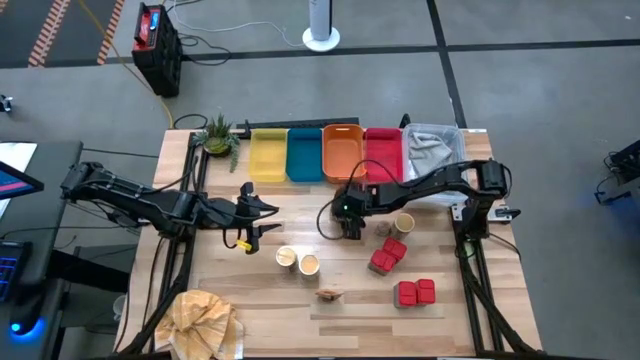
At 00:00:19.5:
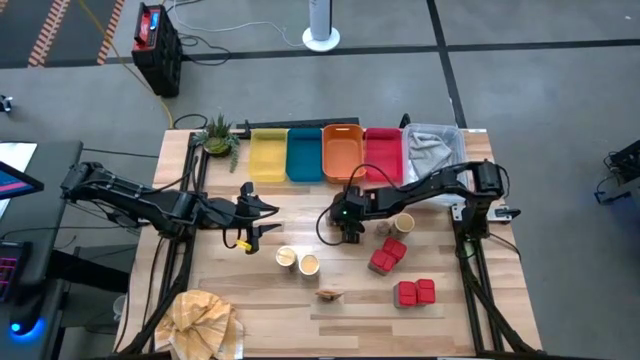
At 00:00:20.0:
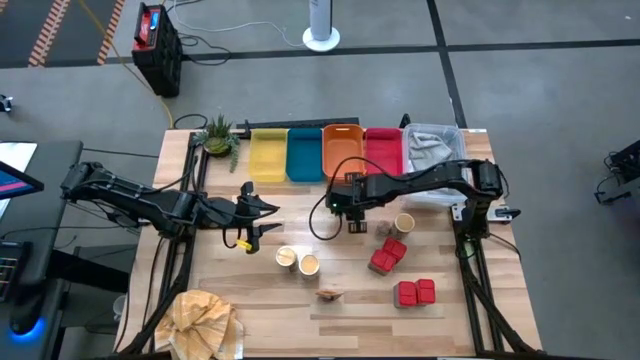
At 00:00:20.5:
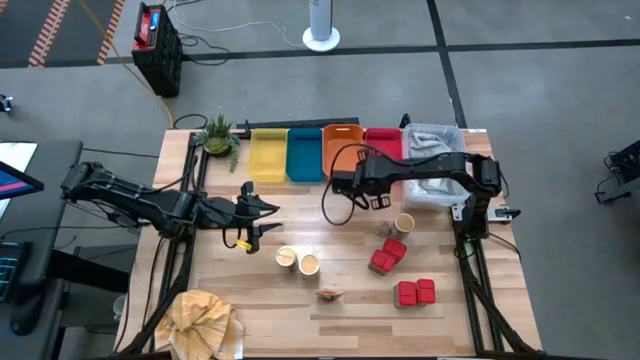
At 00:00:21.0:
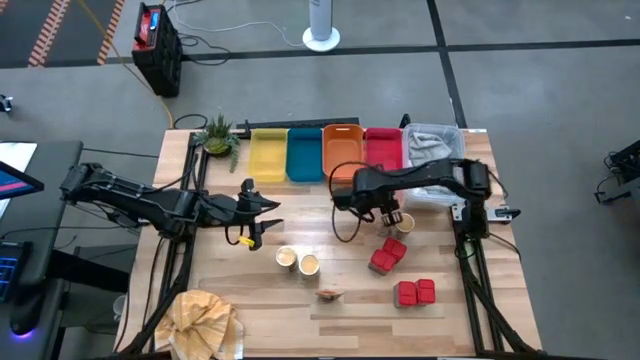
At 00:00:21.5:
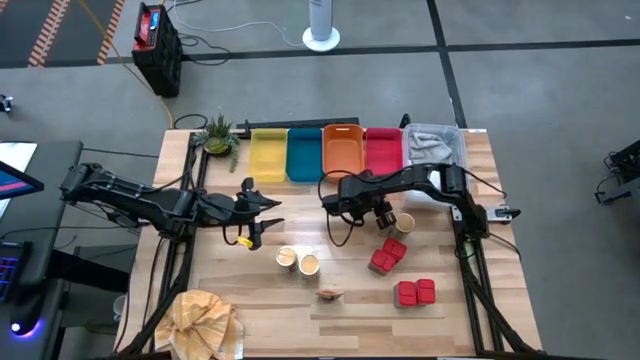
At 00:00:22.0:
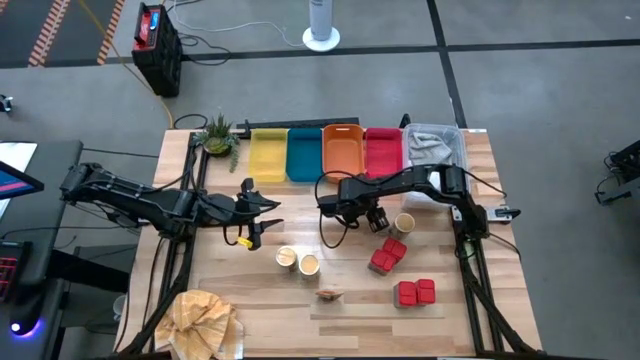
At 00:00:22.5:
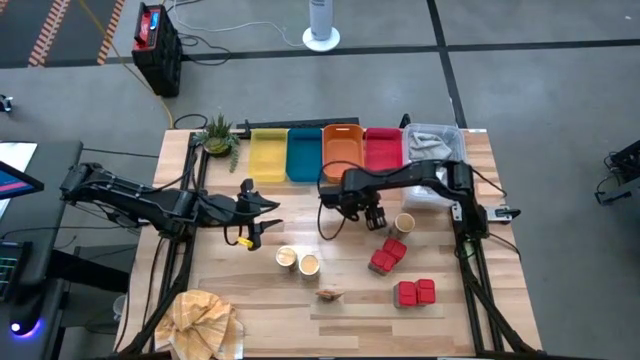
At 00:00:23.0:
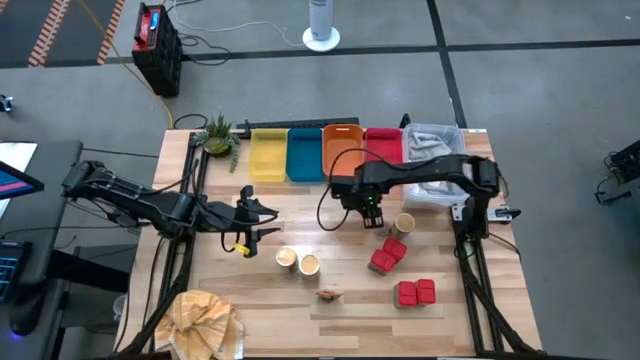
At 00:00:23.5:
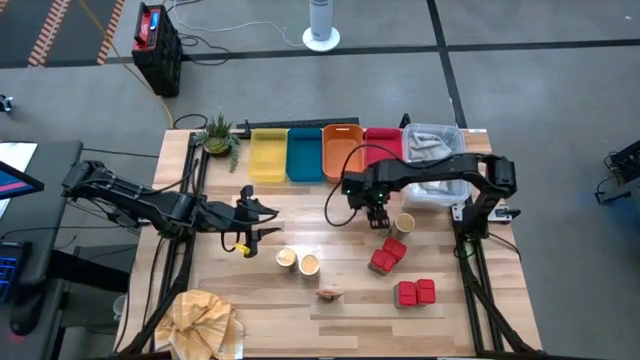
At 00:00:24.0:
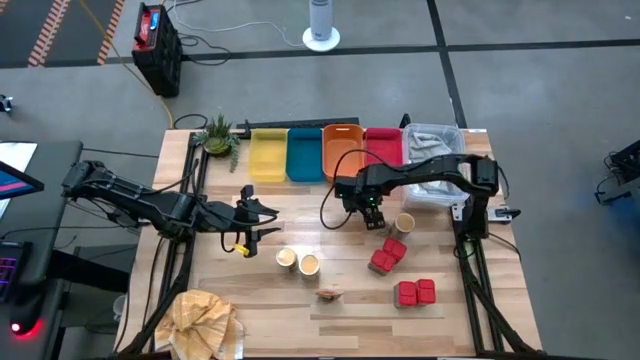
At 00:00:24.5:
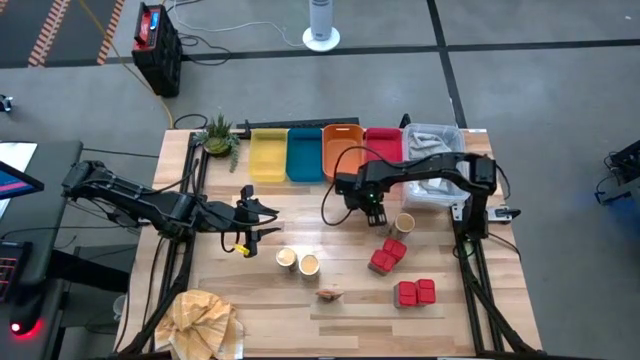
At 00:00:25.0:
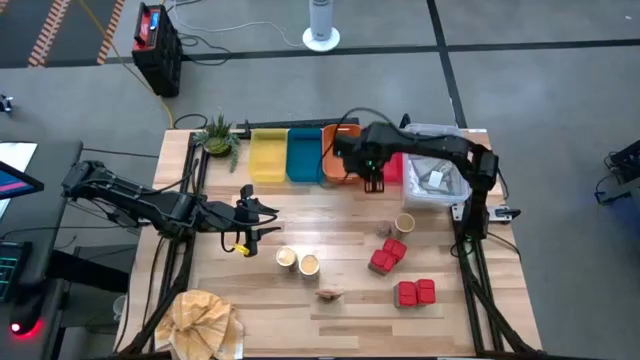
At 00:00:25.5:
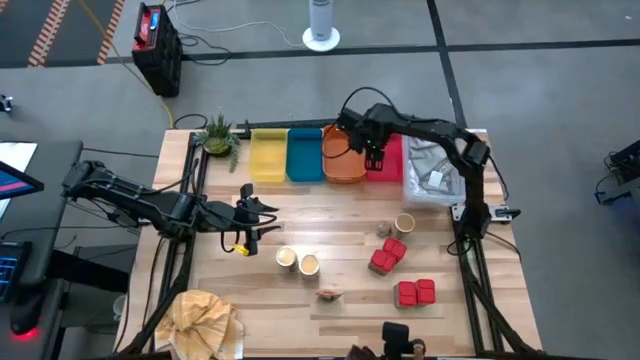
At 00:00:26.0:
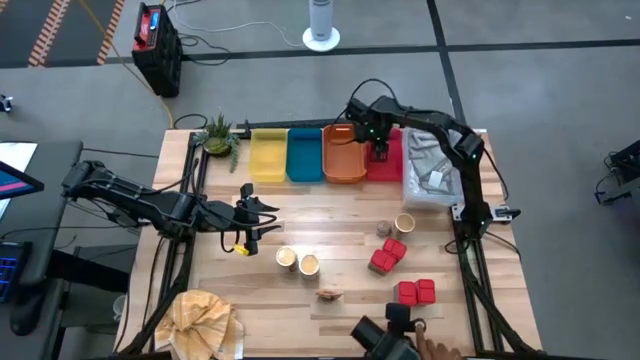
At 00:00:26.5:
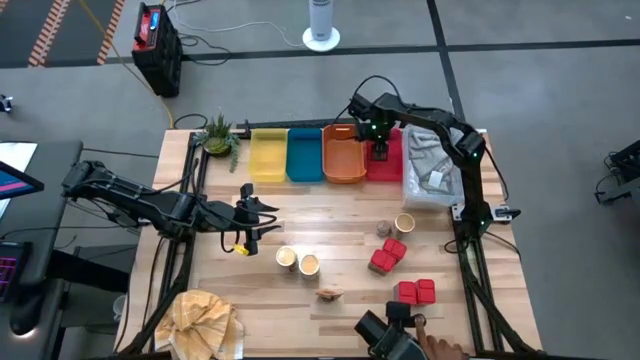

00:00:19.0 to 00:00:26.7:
Task: Sort spices by type
Put the top brown spice bottle into the red bin

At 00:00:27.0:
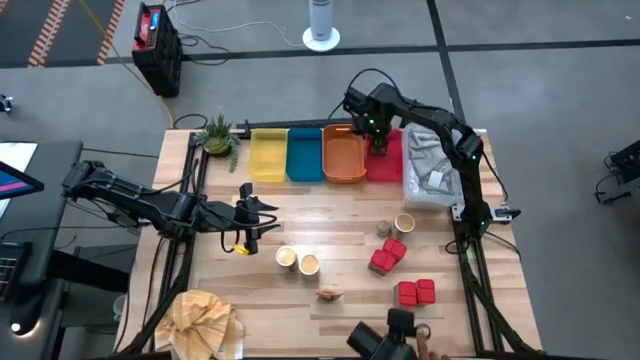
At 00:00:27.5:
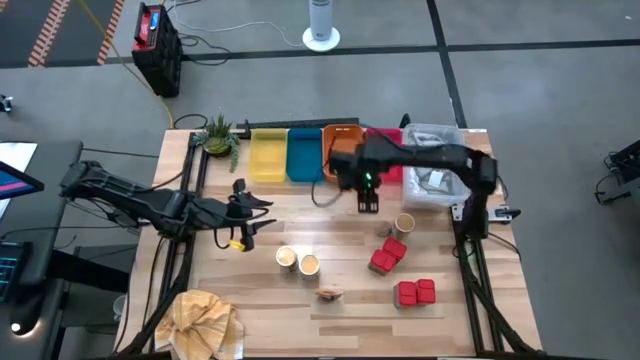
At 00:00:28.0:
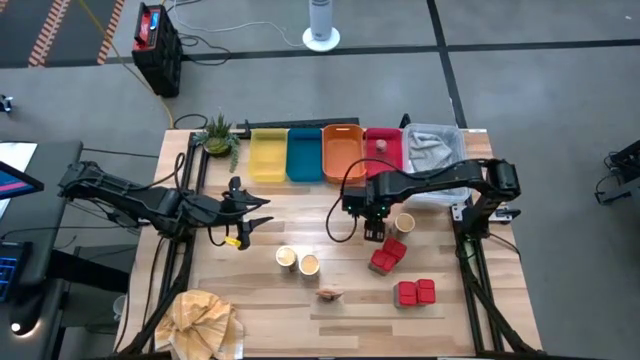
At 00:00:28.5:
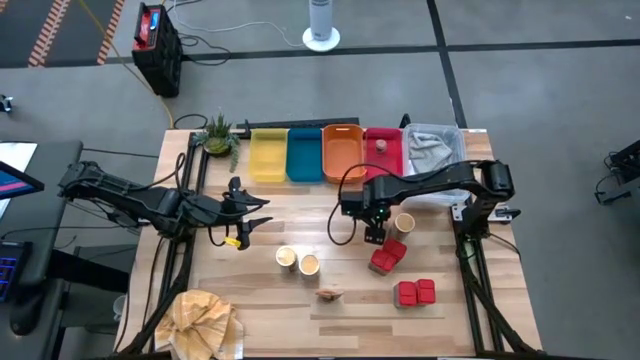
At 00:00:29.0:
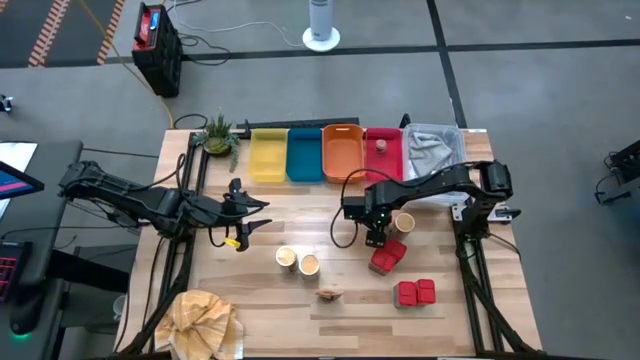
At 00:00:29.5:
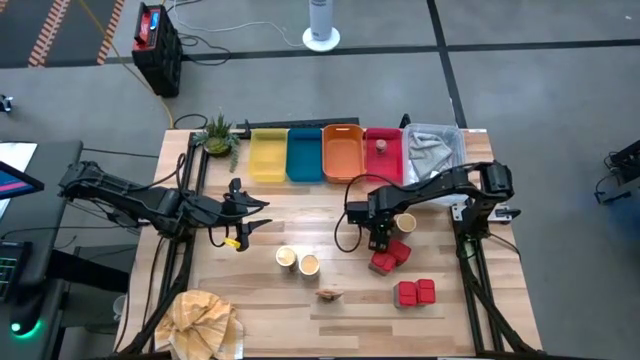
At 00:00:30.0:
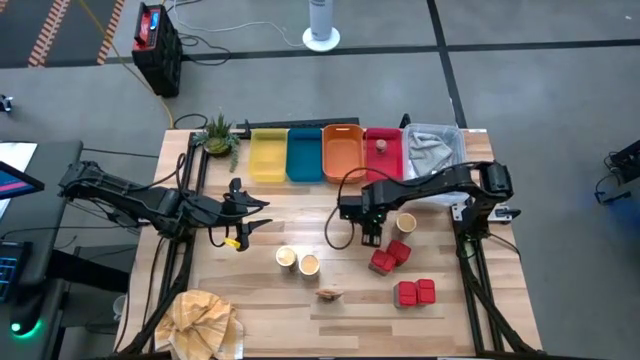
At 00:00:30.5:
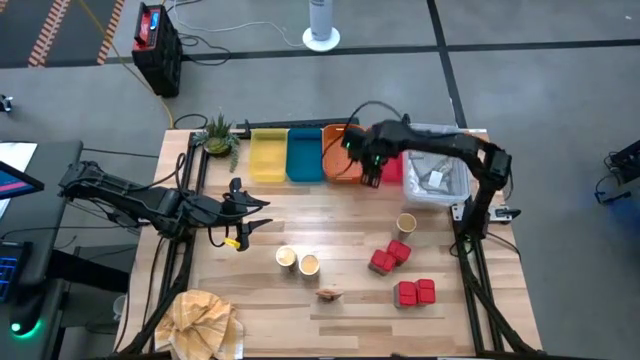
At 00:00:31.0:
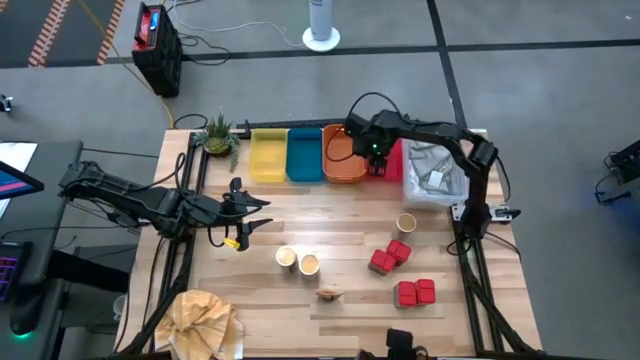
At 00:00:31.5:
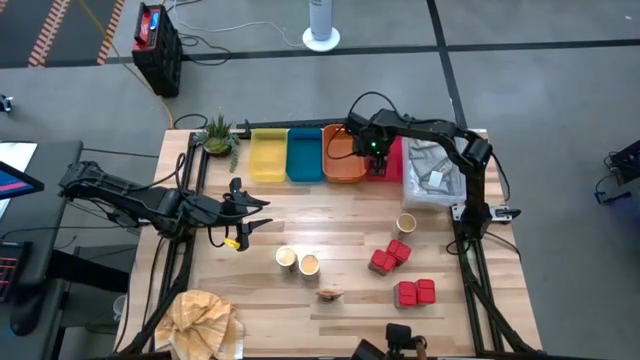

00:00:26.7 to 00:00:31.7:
Put the brown spice bottle into the red bin

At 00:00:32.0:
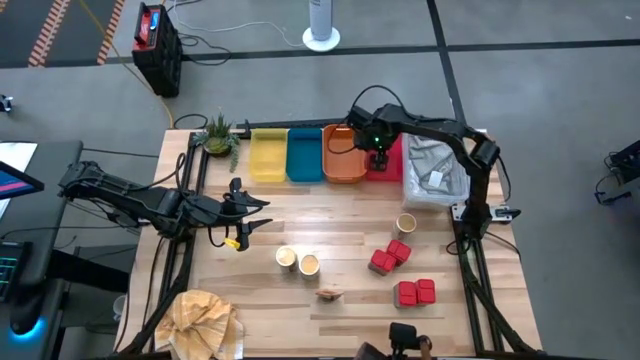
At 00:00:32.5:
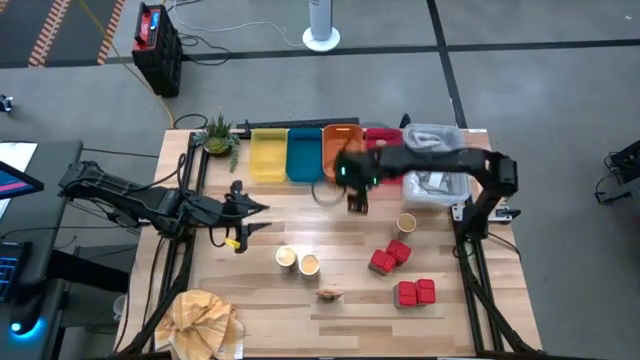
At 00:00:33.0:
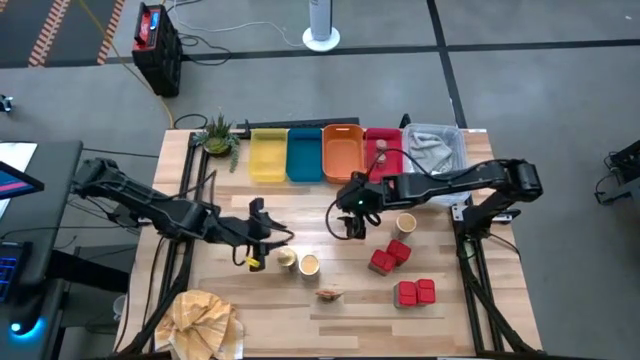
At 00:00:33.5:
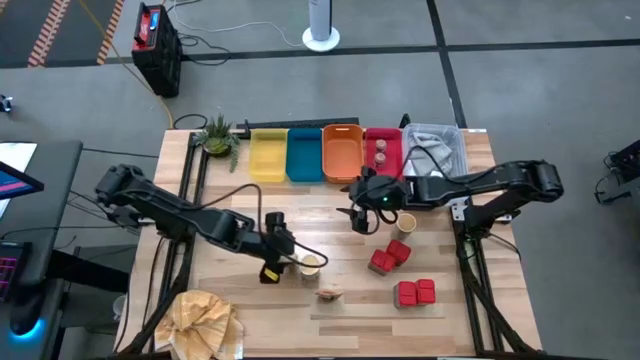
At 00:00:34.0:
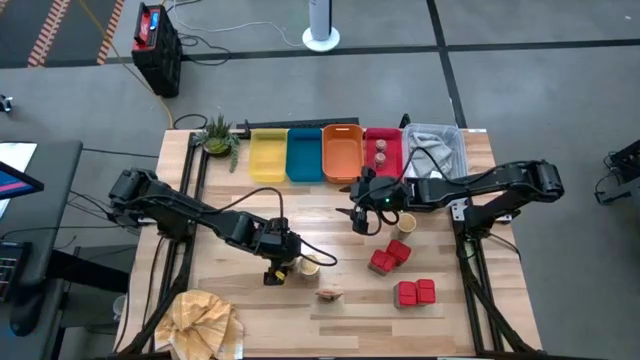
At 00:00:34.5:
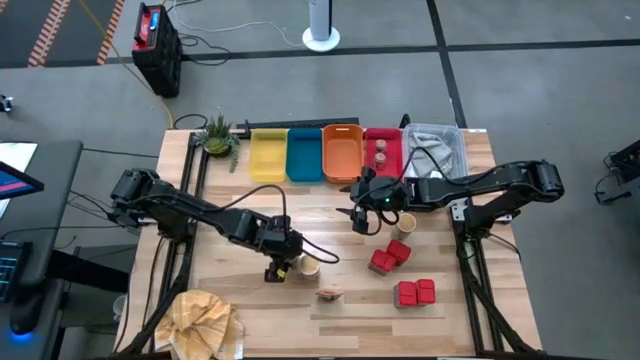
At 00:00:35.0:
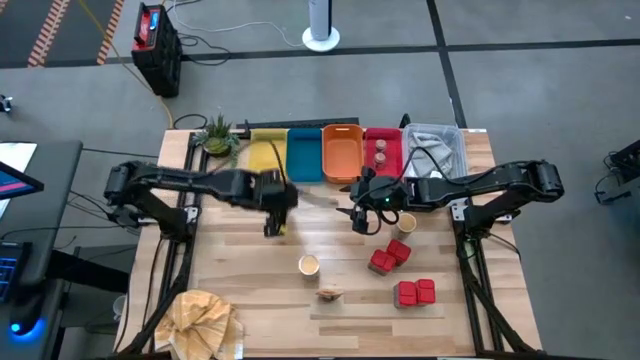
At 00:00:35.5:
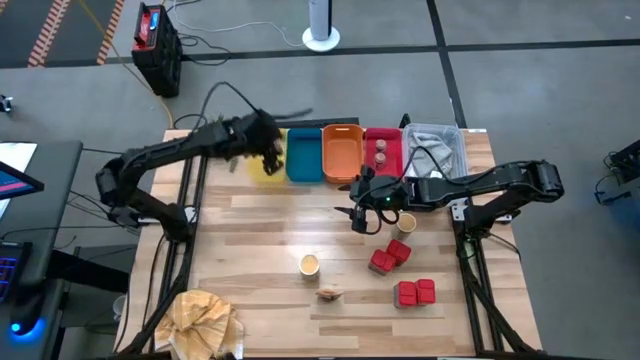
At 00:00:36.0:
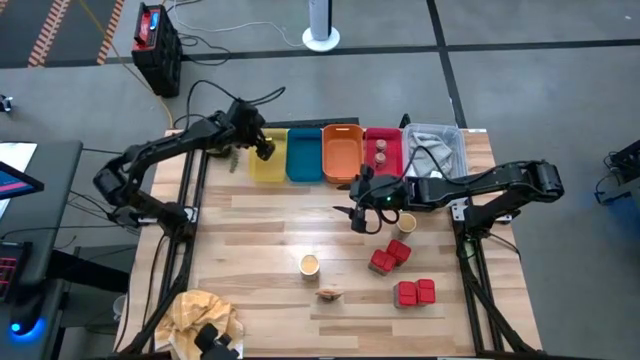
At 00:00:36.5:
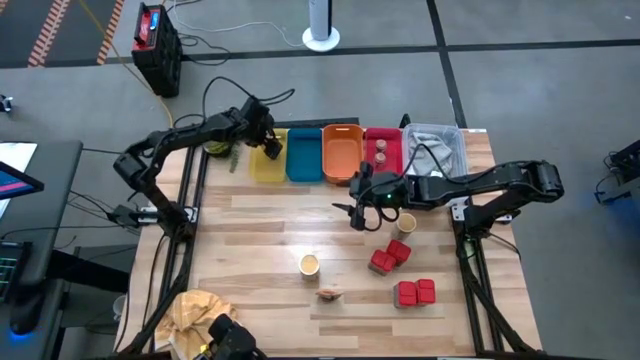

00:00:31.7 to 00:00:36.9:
Put the bottom left gold spice bottle into the yellow bin

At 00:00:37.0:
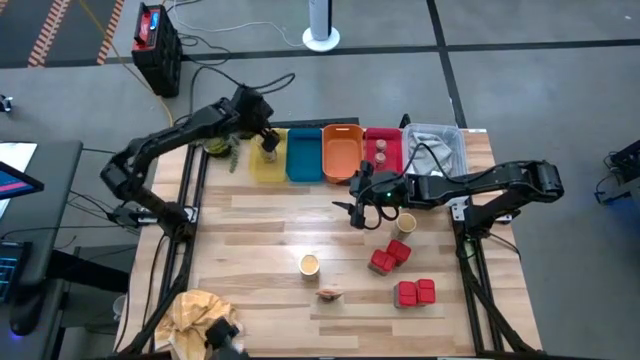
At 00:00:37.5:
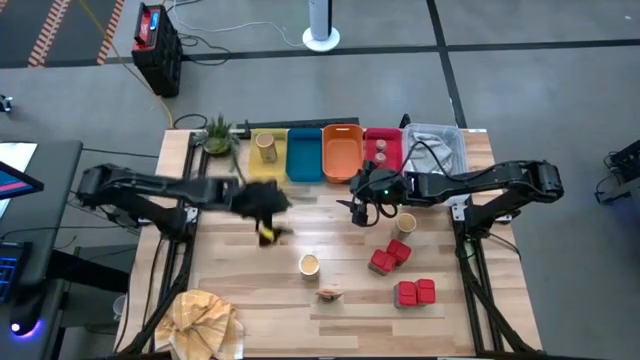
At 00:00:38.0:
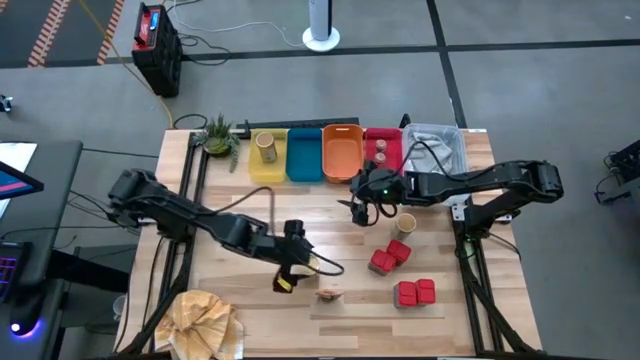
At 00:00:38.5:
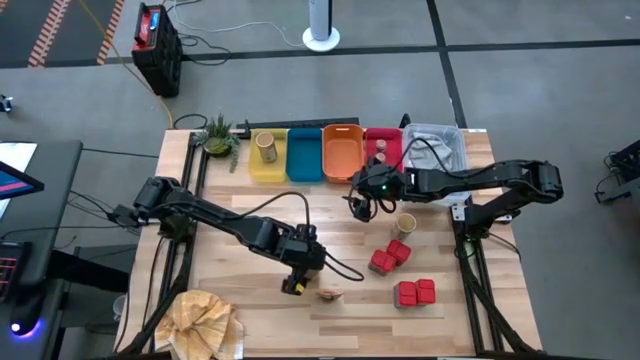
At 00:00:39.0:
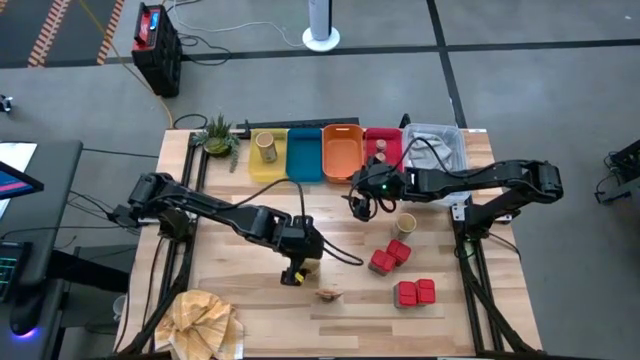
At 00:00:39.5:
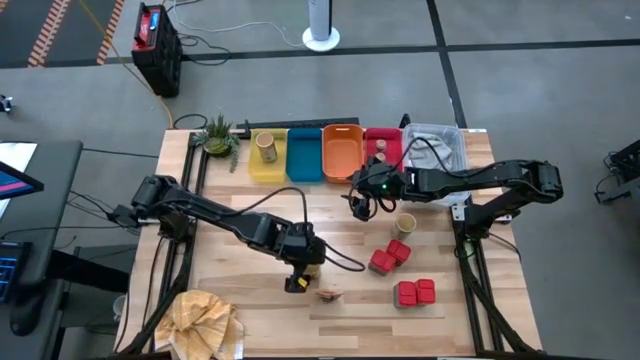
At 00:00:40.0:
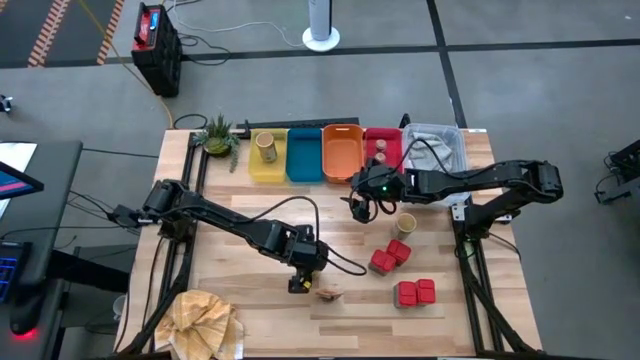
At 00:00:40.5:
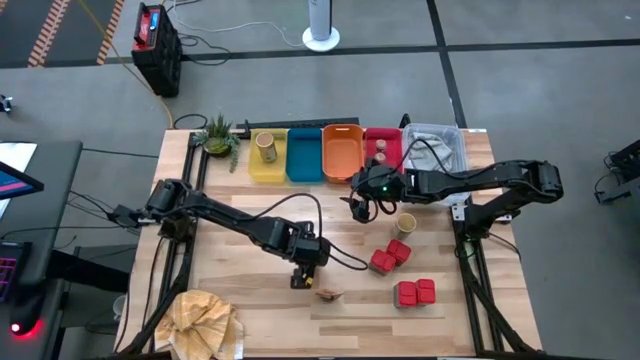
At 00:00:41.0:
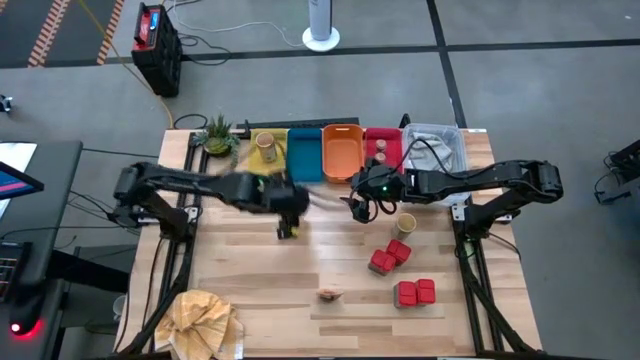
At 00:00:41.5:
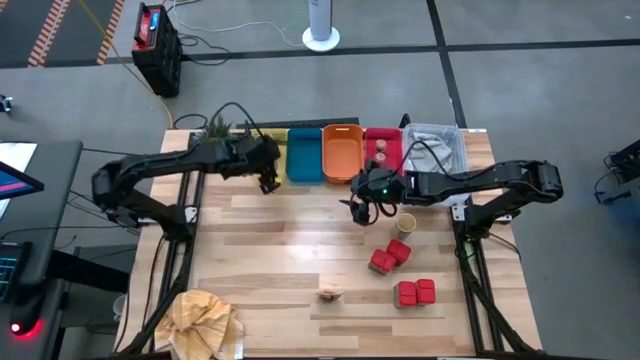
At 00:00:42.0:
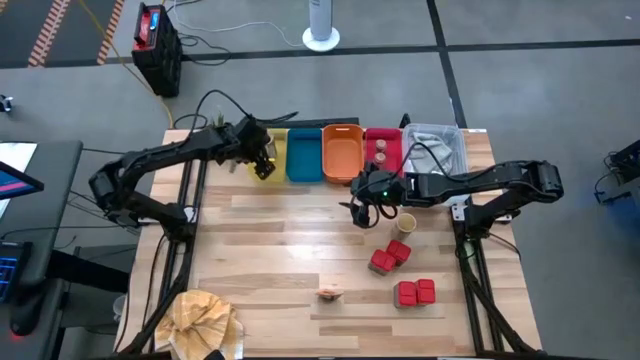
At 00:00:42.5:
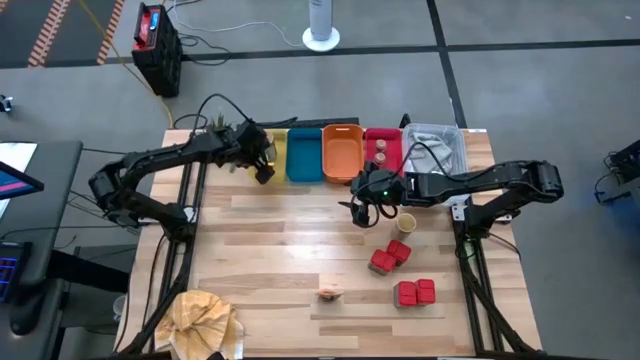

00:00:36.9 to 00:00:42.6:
Put the bottom gold spice bottle into the yellow bin
